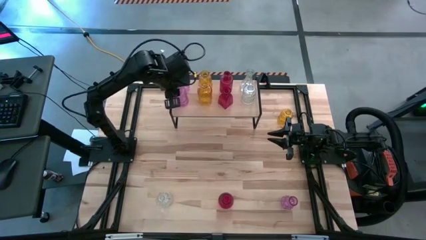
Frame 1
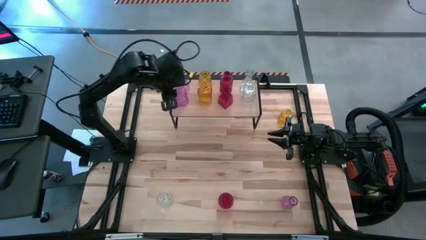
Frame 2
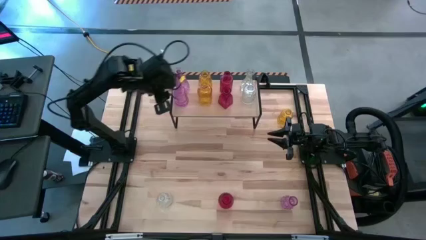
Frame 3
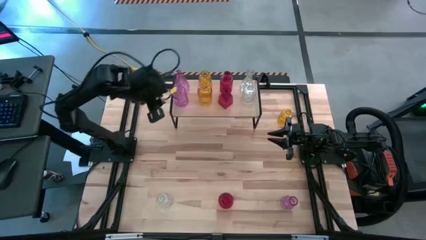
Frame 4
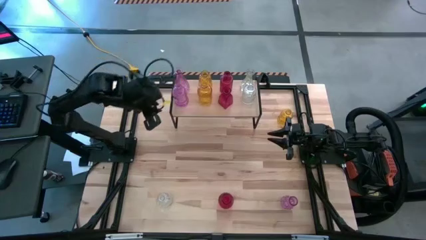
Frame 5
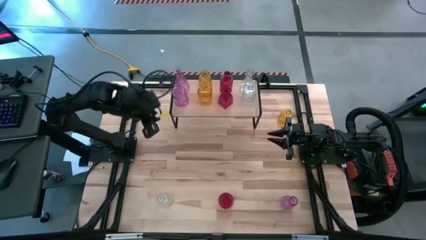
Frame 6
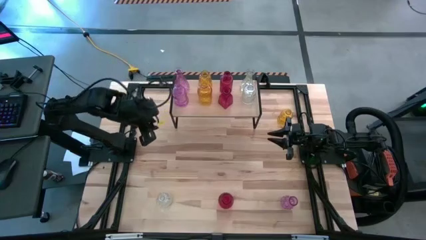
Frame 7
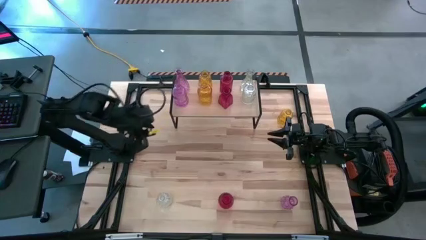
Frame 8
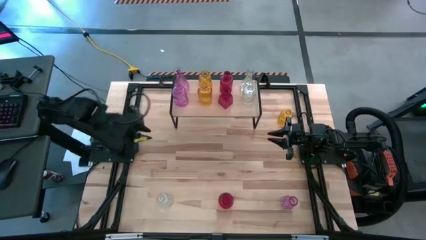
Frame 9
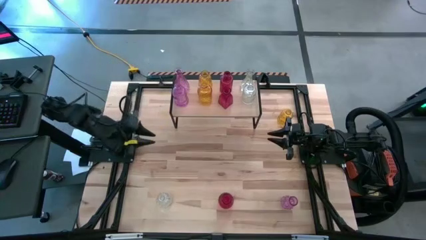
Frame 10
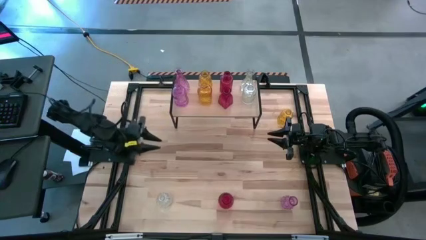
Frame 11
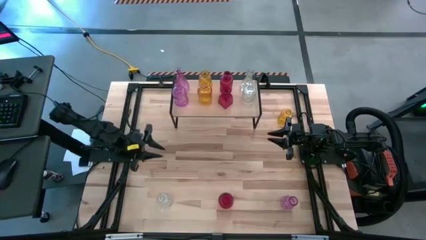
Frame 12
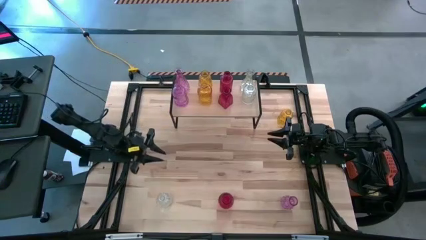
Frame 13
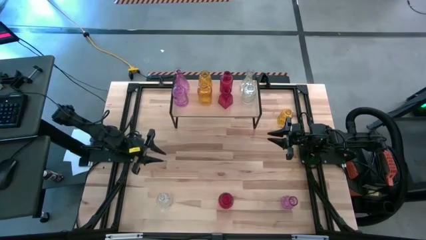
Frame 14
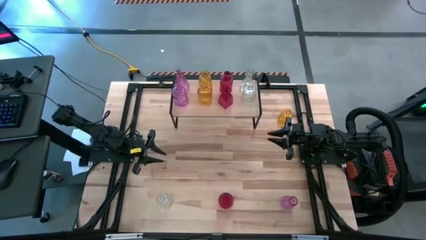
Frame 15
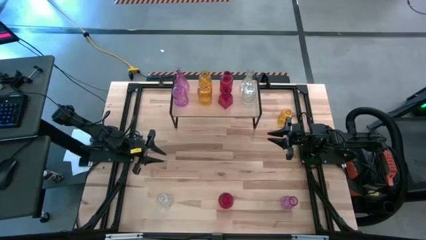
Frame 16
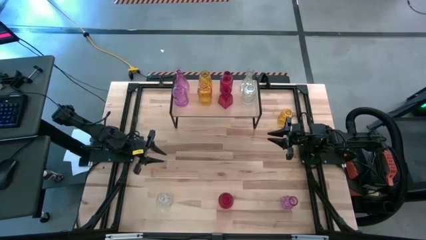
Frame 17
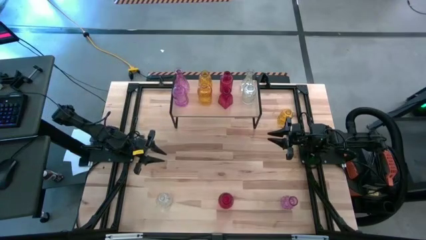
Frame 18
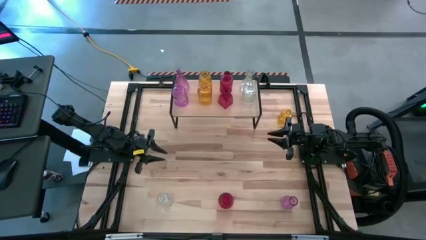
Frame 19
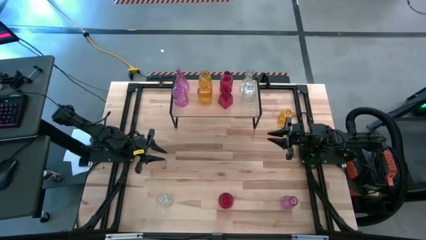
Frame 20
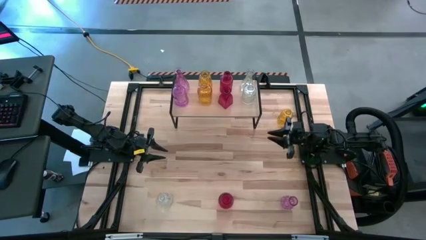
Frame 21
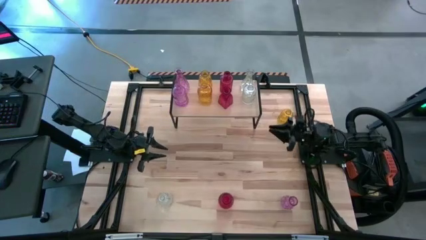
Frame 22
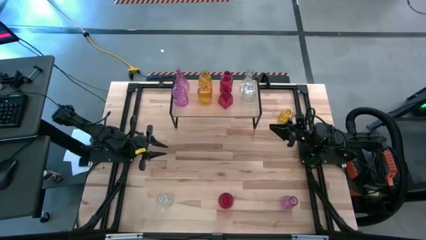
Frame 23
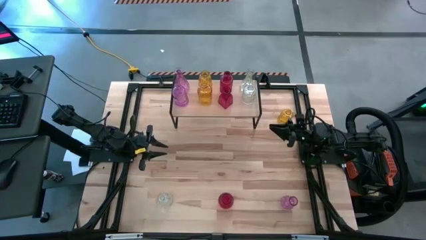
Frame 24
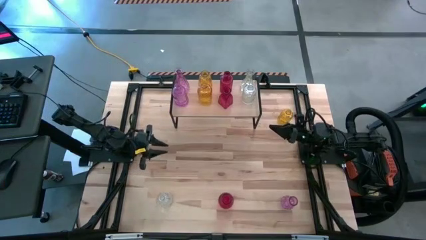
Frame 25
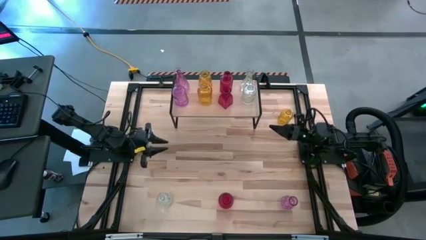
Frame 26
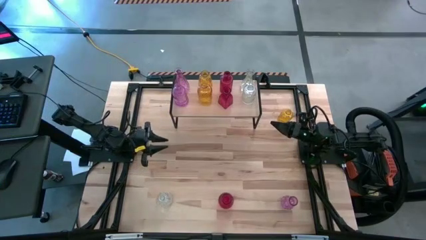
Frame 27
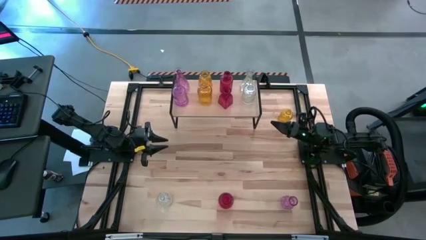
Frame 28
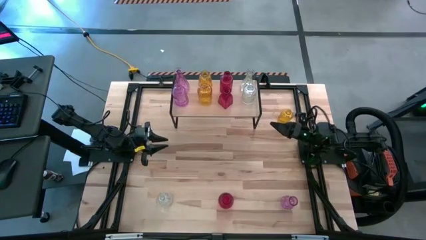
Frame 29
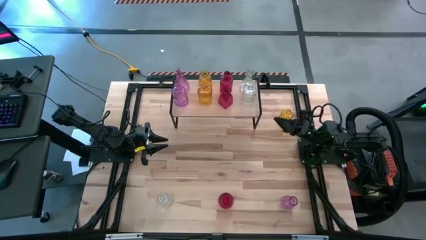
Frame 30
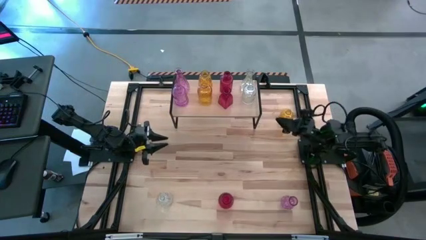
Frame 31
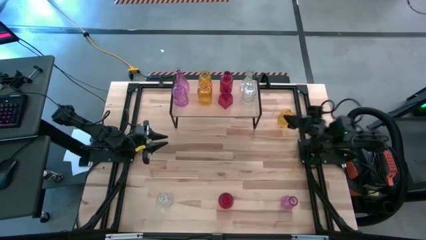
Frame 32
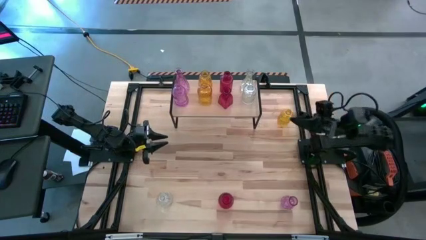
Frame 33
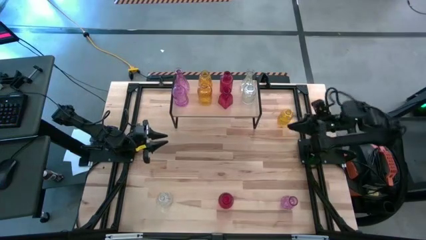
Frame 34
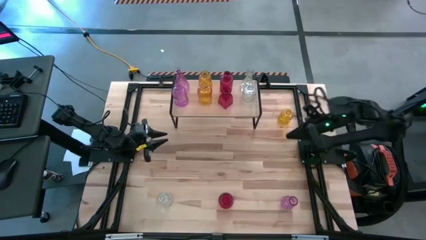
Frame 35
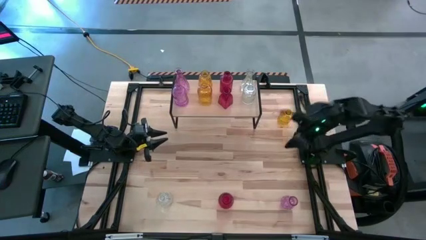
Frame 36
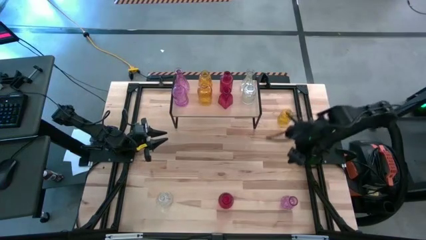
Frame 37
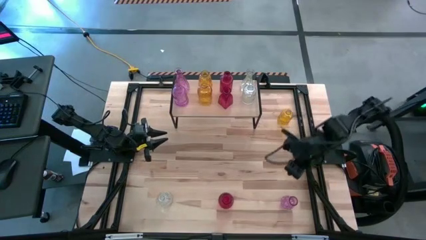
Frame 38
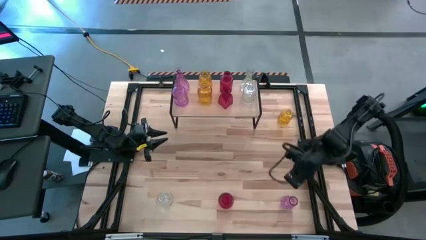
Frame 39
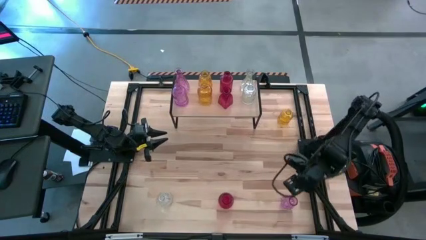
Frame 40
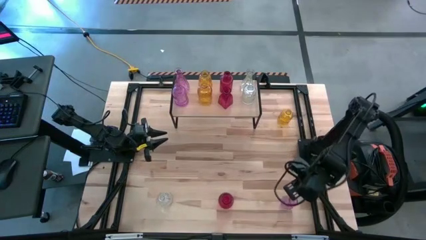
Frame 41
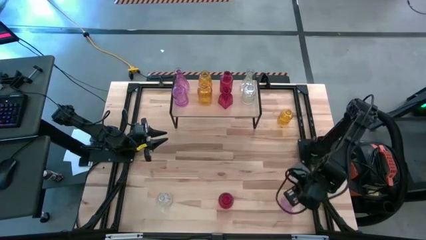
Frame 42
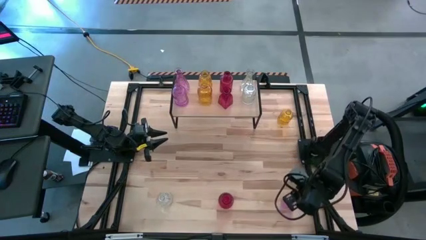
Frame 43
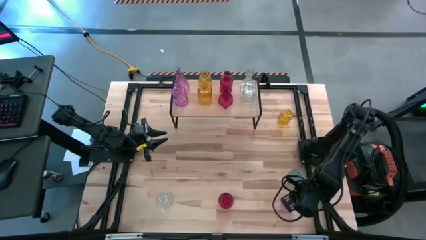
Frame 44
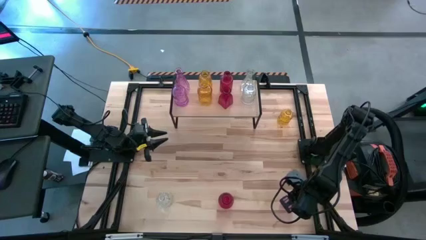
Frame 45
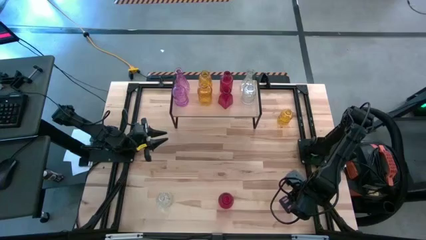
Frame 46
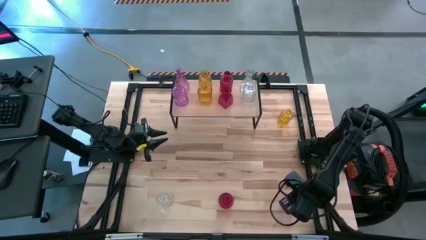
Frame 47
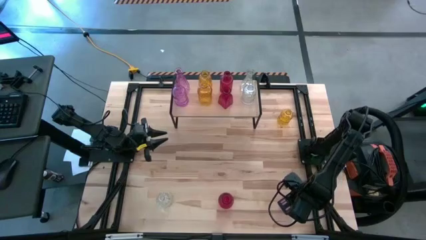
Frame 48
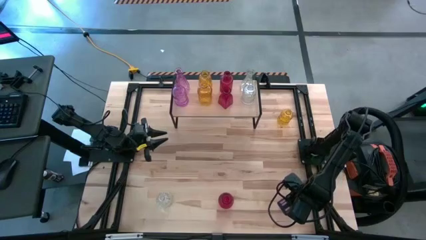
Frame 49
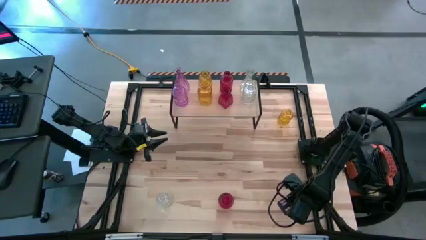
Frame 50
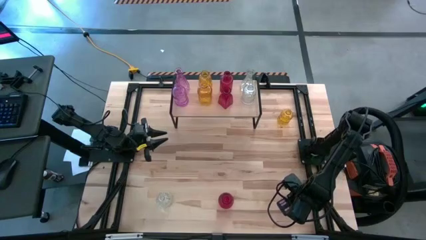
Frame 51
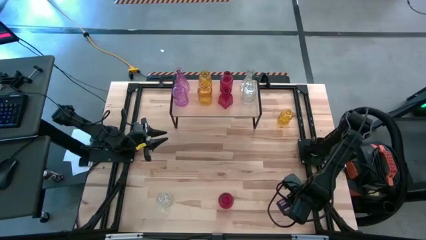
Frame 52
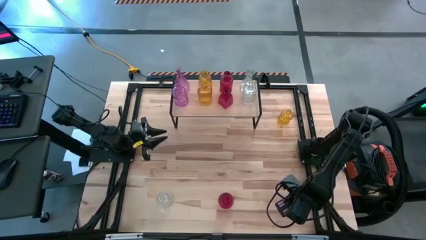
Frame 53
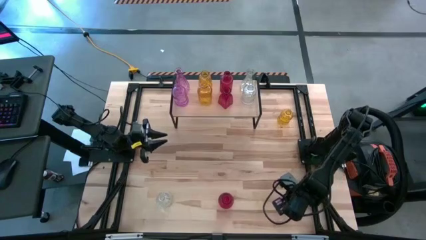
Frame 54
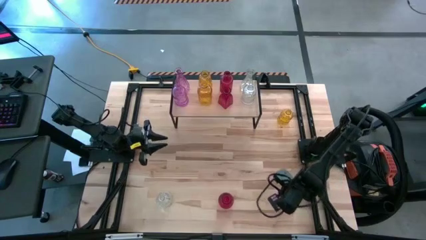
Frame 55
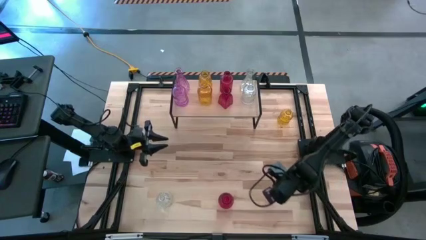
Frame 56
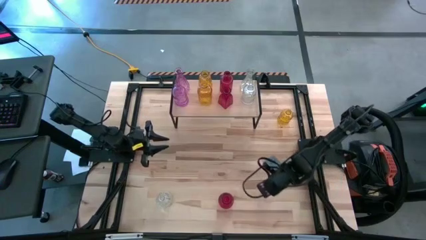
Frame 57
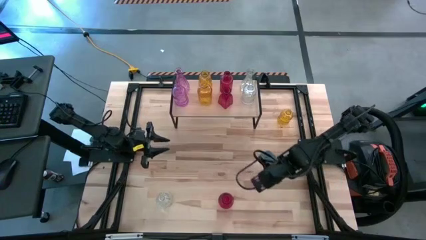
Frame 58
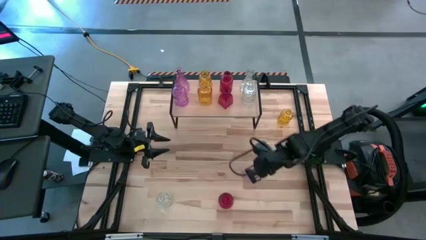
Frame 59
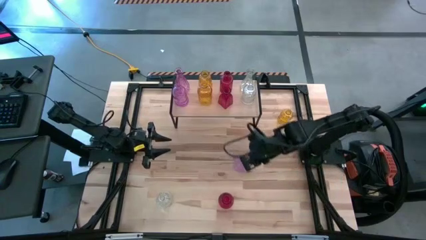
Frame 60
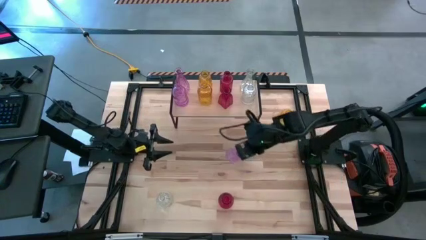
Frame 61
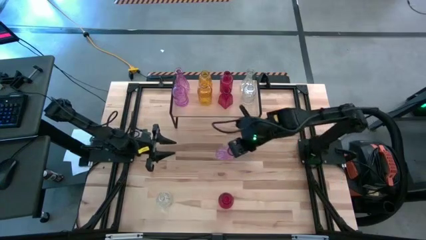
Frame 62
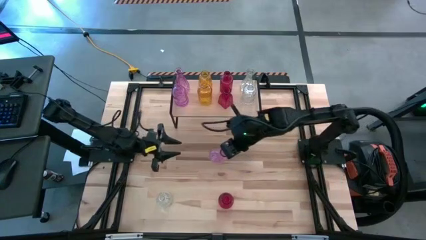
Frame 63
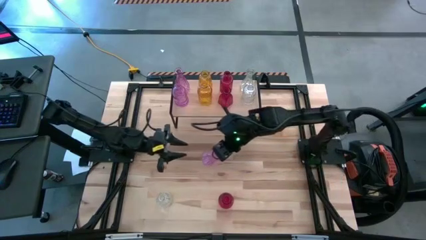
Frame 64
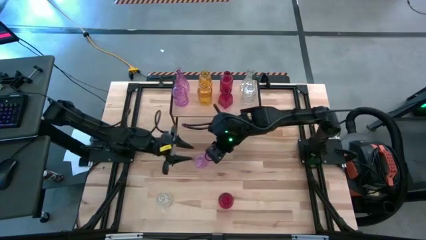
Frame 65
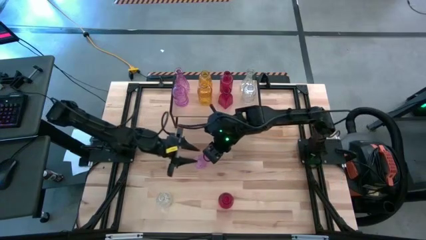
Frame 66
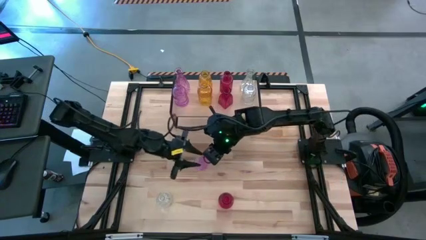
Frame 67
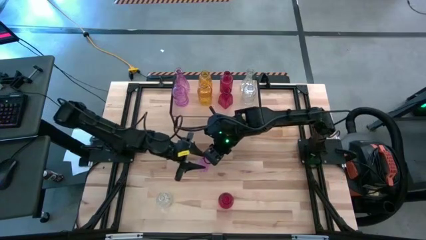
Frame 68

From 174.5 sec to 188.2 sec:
Task: sort vases onto shelf
Put the purple vase on the shelf and align it with the other purple vases

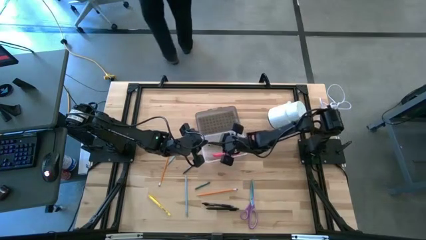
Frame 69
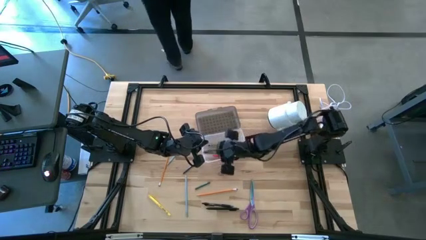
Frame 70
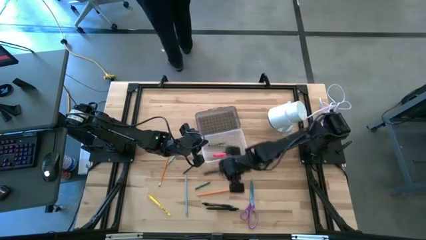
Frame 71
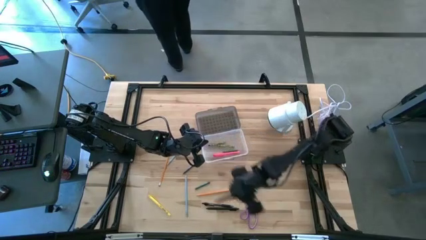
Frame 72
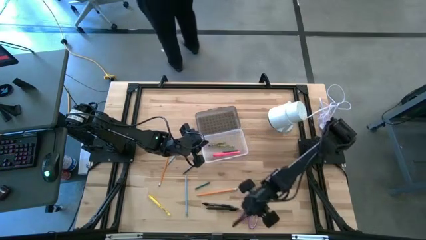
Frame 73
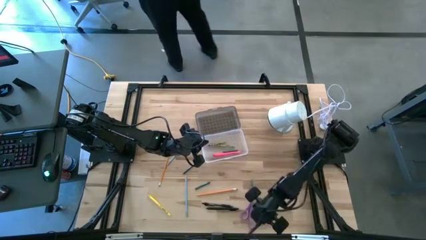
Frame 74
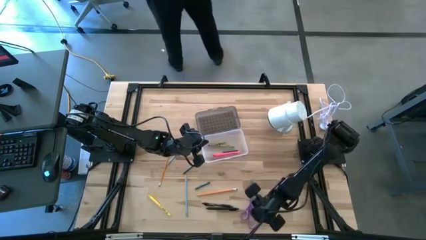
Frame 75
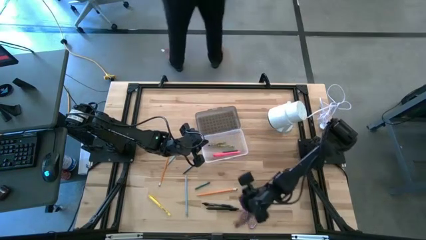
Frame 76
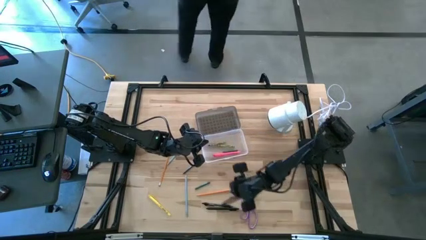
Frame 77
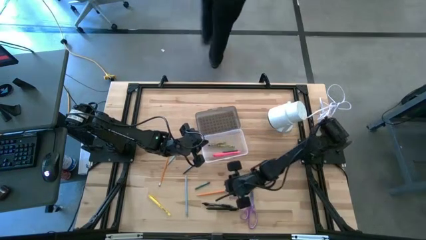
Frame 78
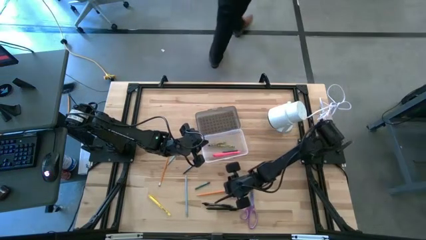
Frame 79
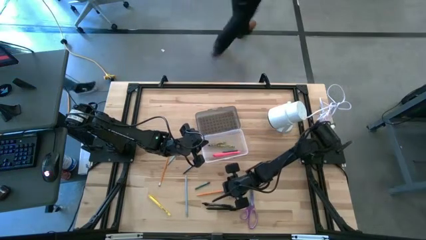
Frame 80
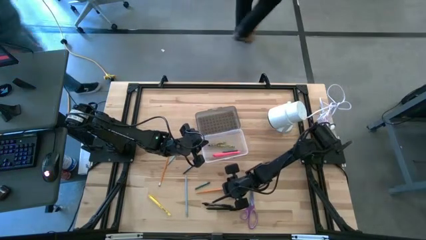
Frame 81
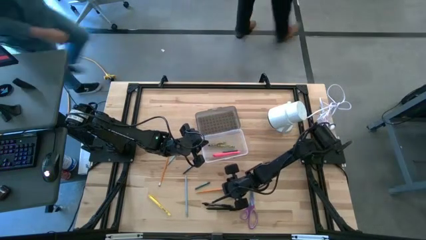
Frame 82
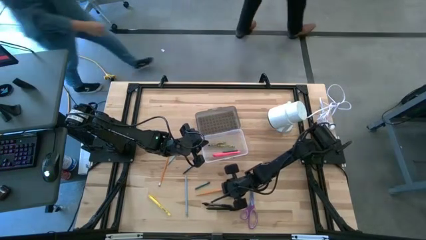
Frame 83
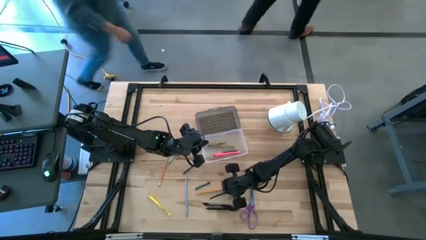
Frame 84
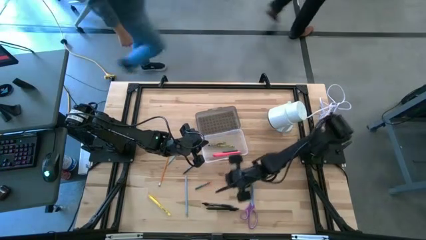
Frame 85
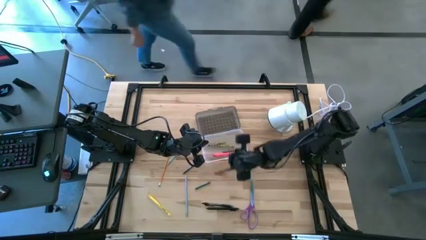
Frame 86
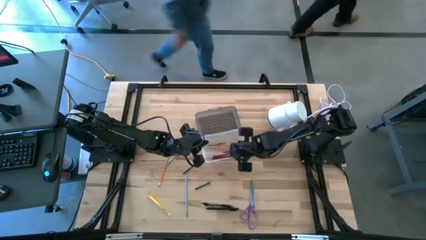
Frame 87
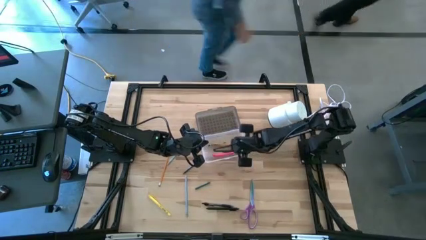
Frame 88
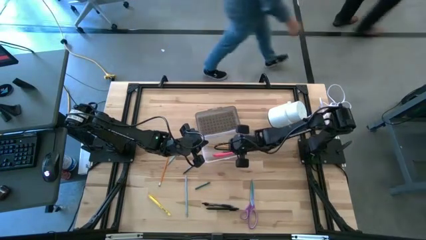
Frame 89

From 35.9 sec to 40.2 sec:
Task: Pick & place school supplies into a supply box
Put the bottom orange pencil into the gray supply box
